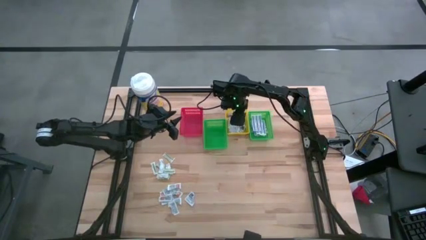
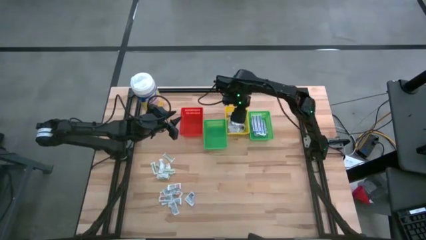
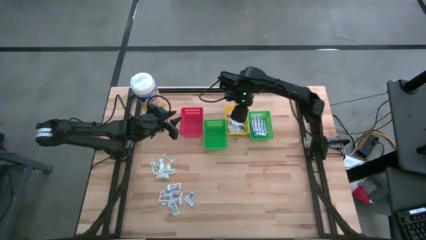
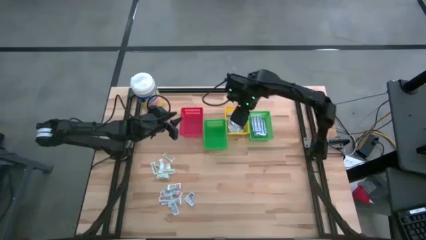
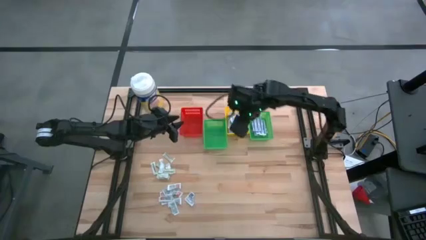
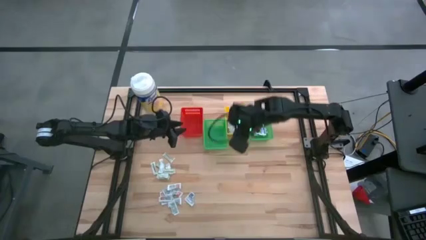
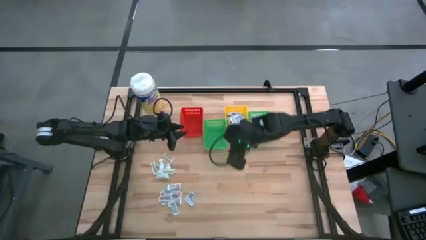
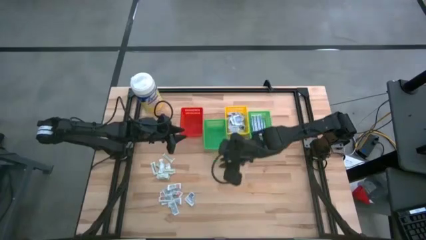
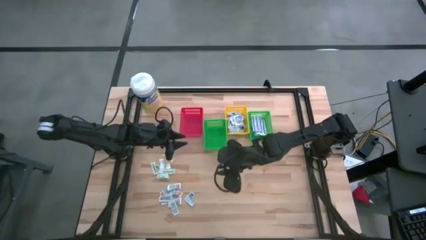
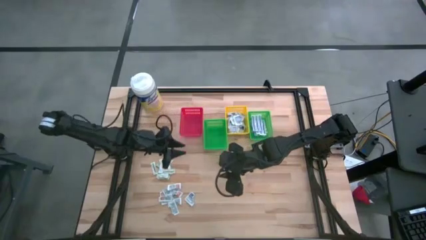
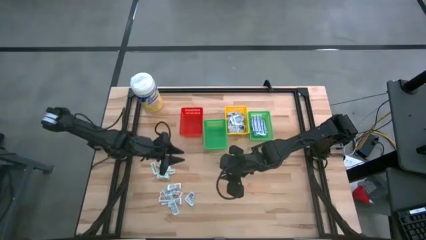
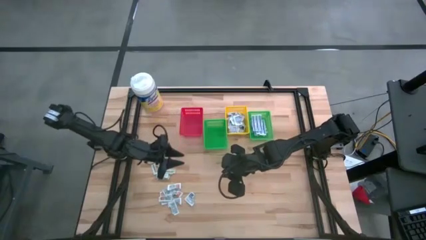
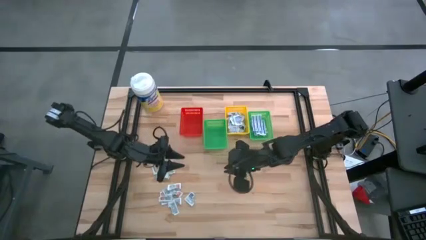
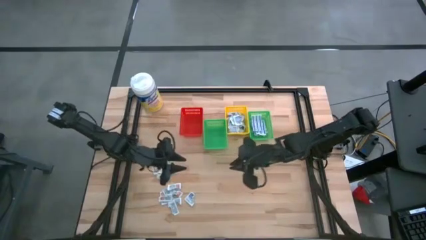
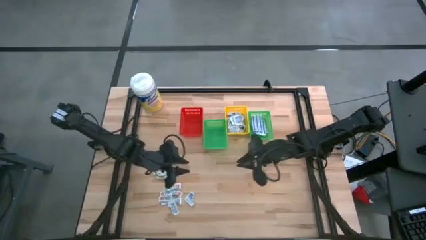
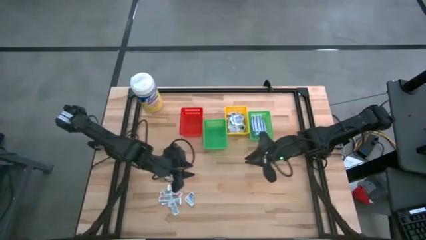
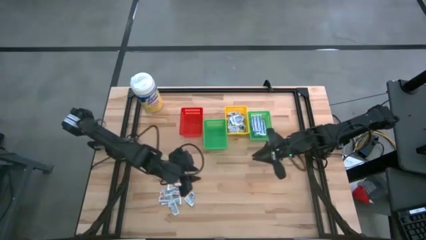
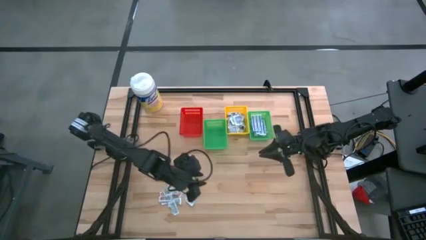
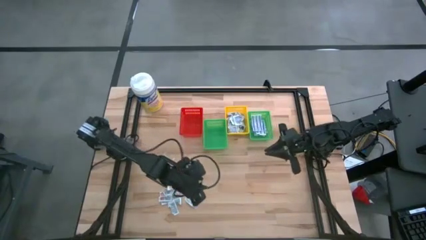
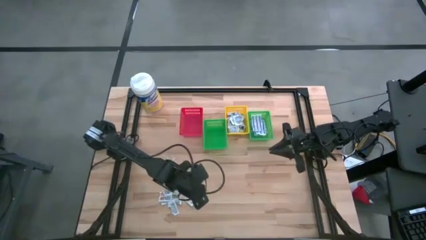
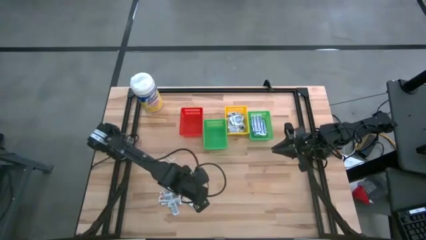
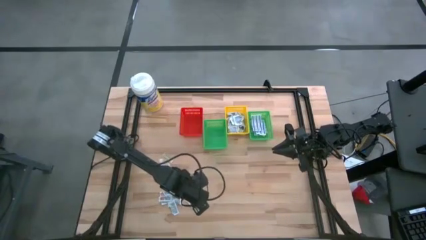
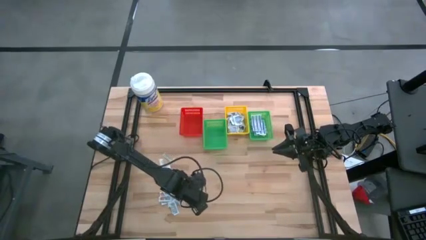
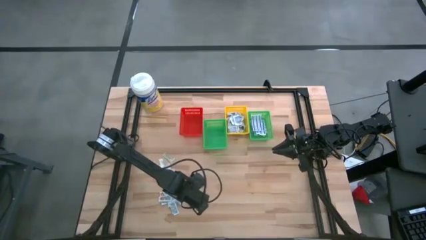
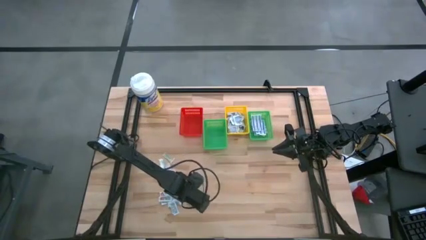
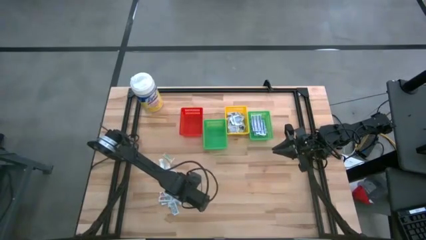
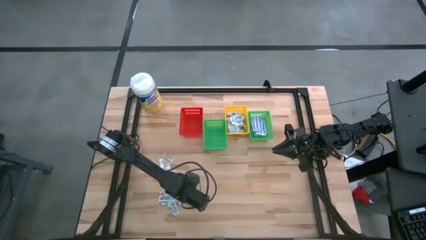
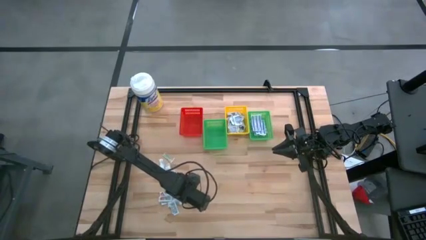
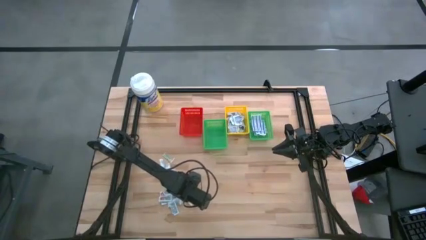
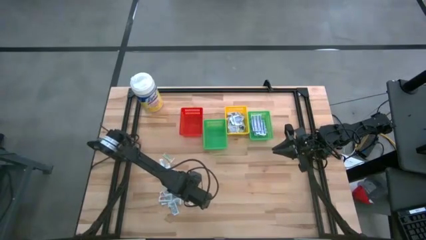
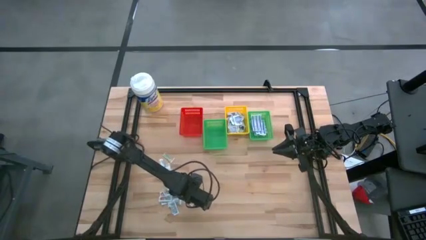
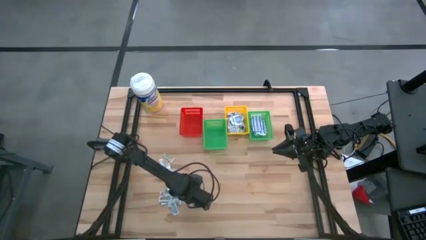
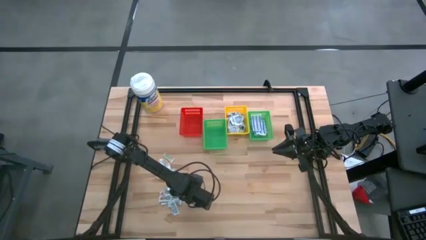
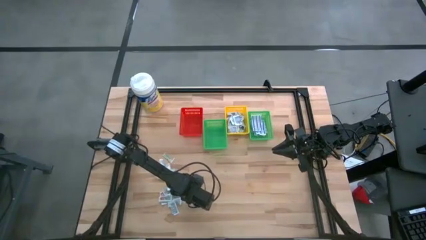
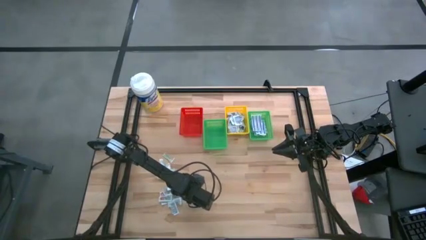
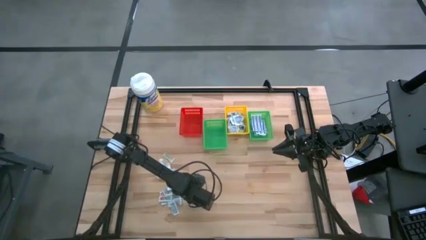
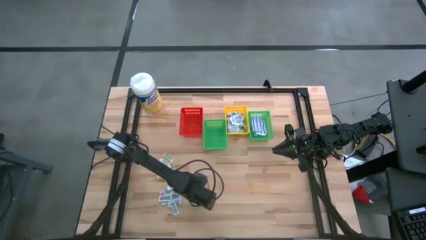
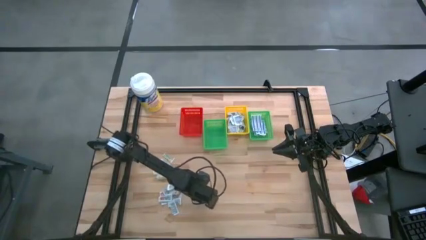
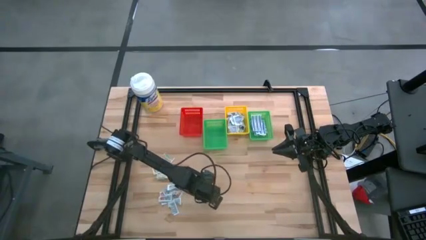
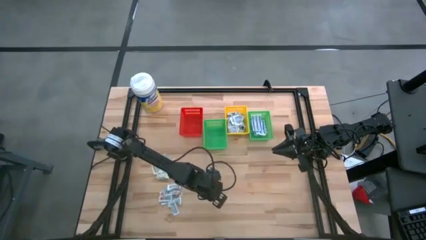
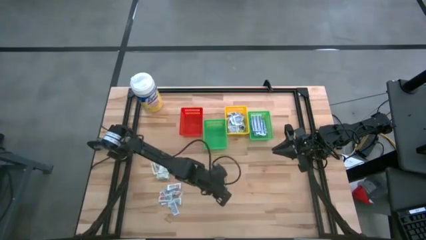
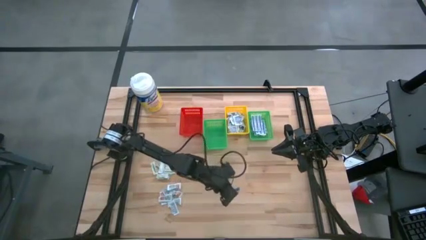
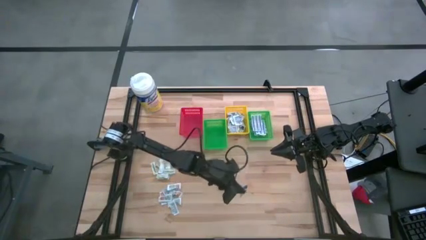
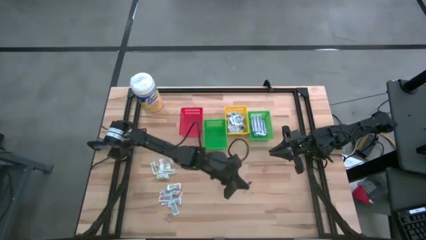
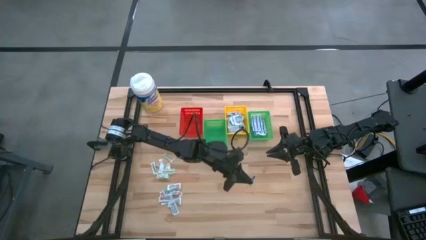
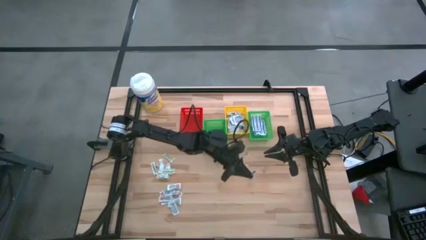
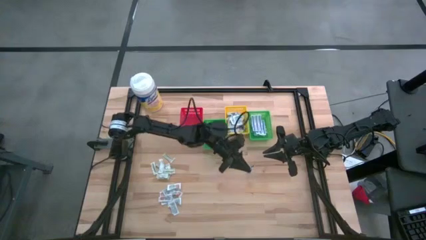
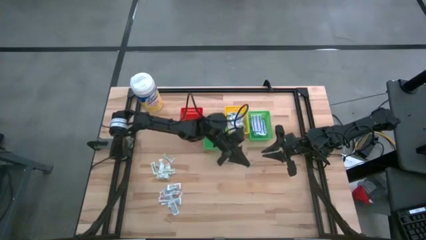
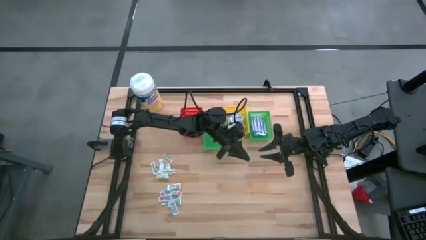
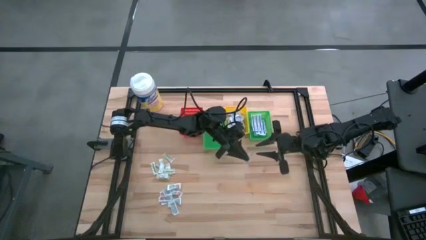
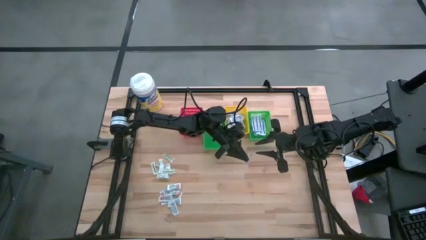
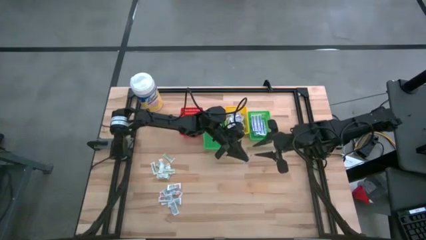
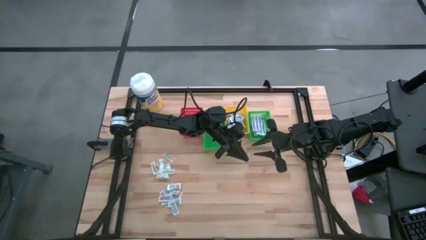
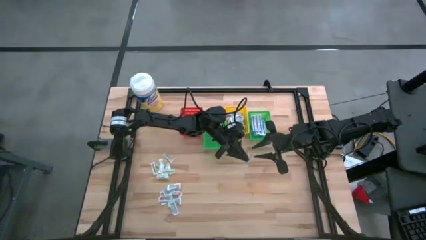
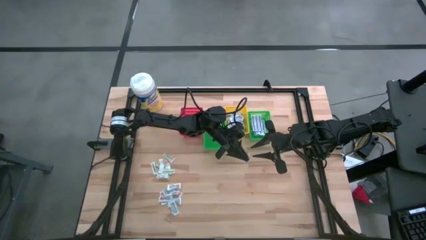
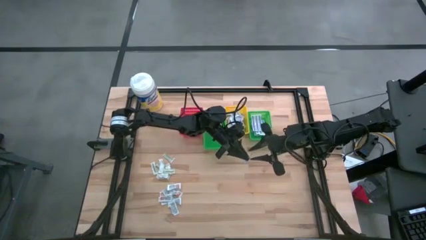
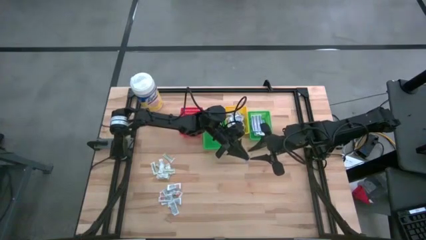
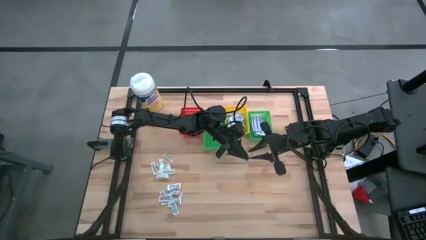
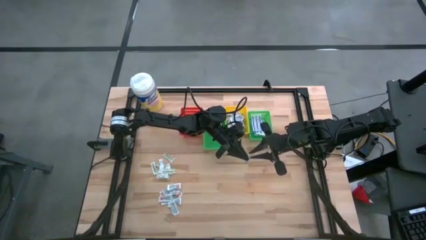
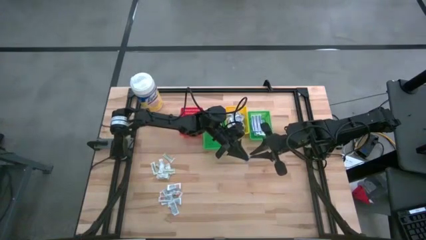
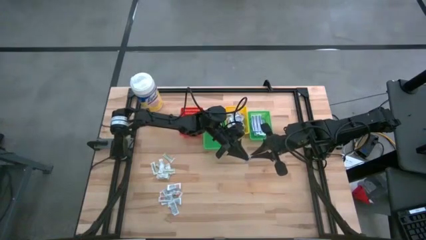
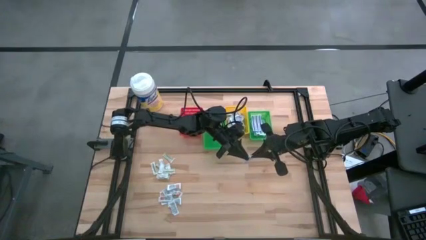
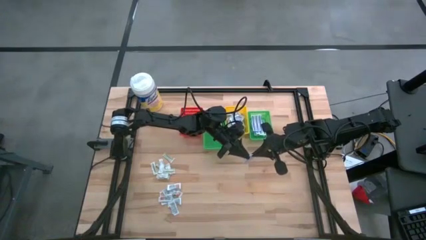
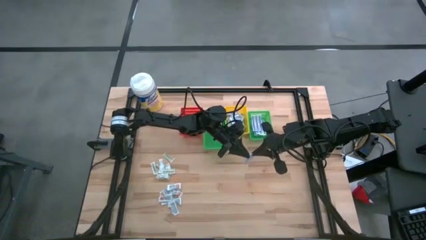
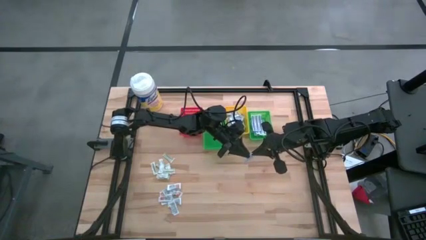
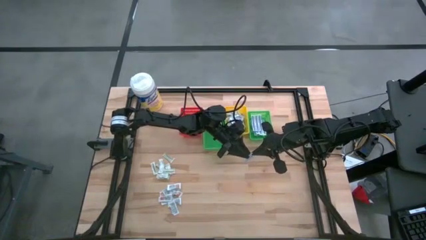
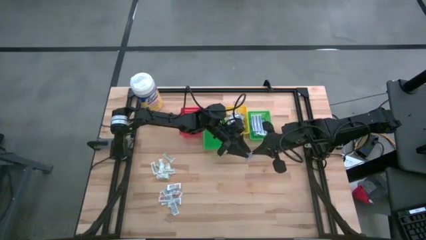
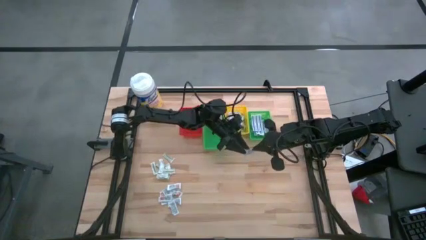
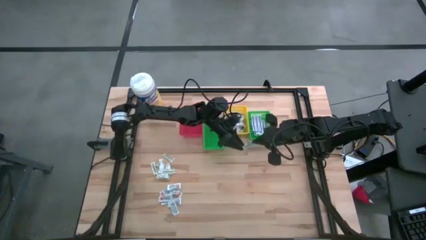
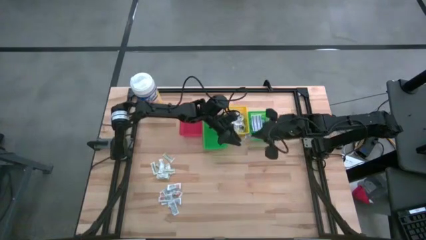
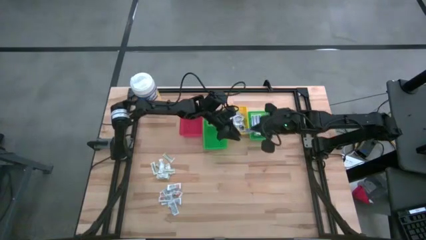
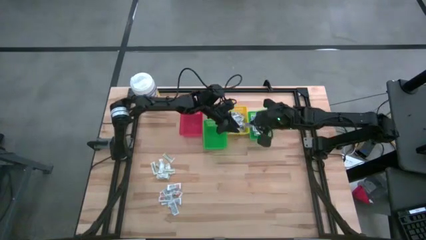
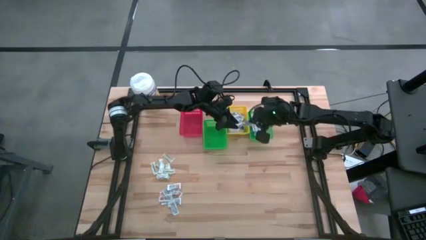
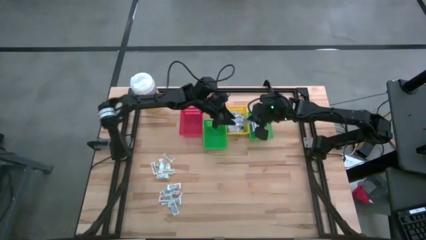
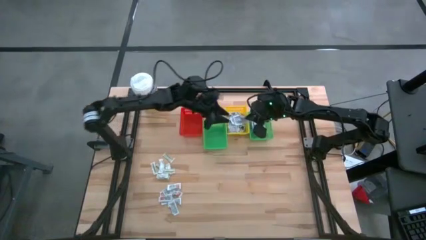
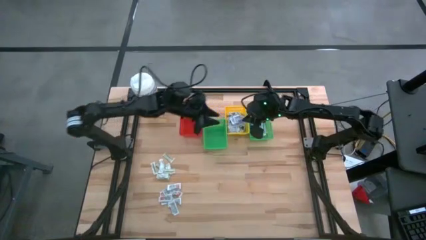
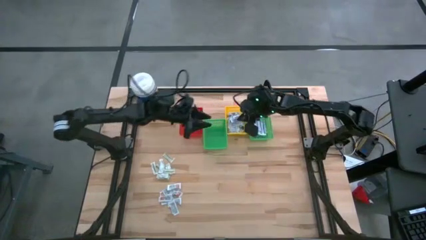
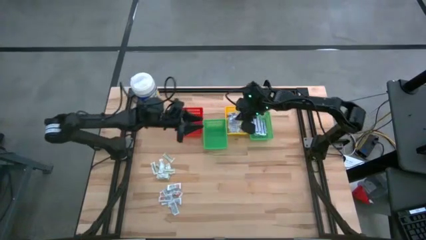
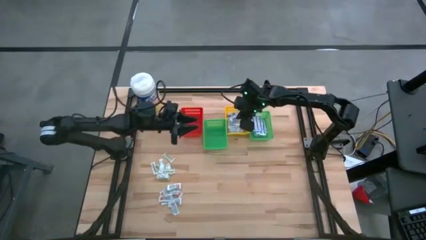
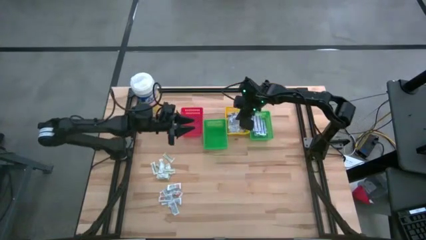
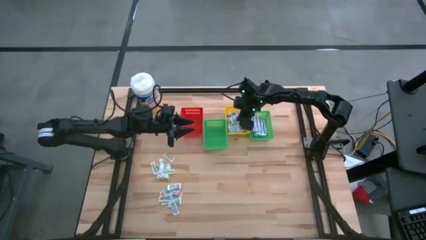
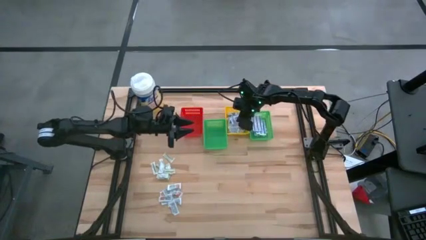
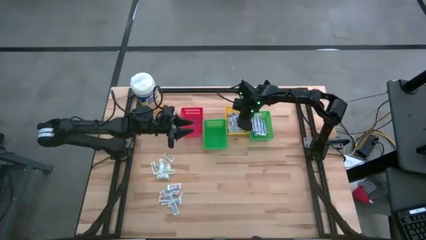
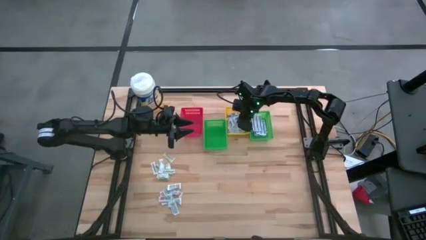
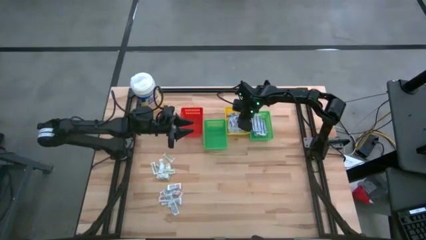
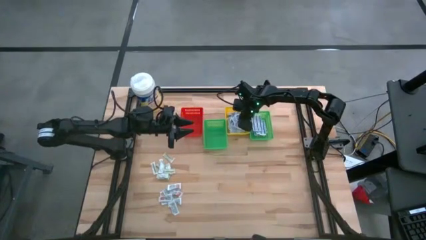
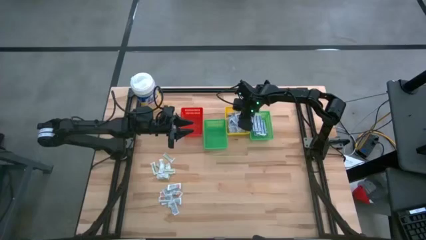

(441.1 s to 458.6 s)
Task: Pick & Place First Aid Supplies
Put the alcohol pad into the yellow basket
